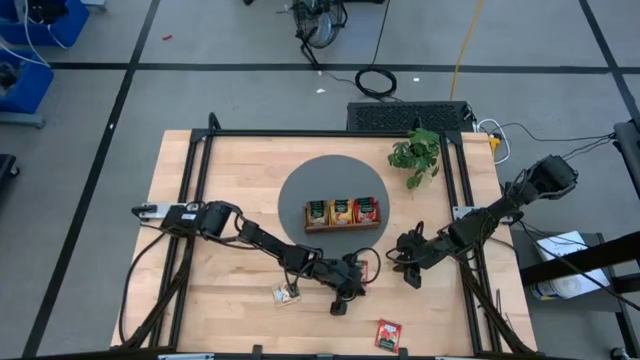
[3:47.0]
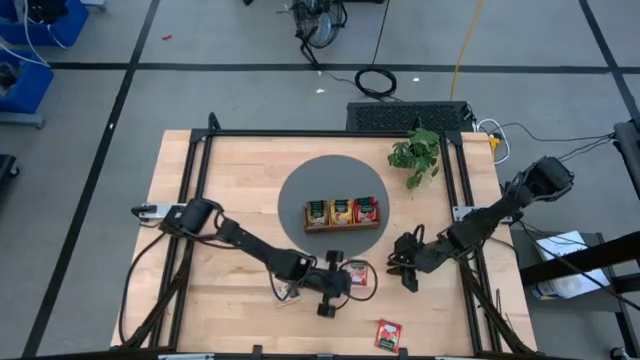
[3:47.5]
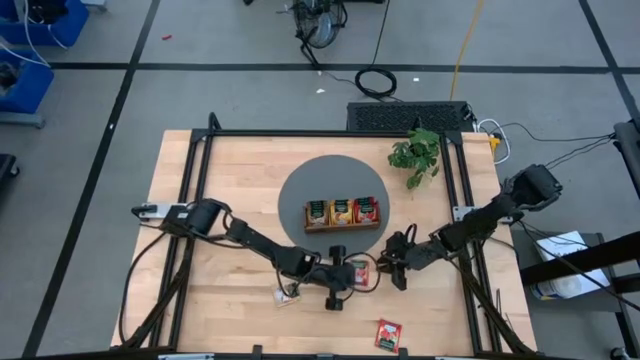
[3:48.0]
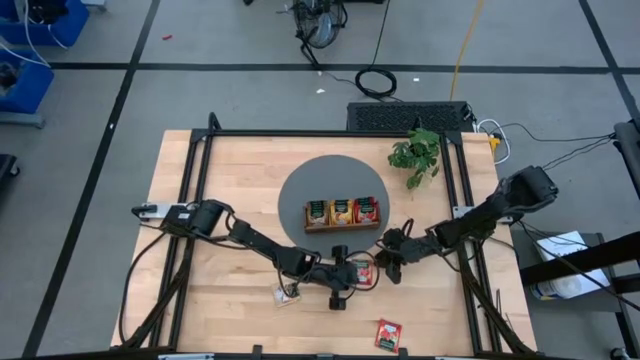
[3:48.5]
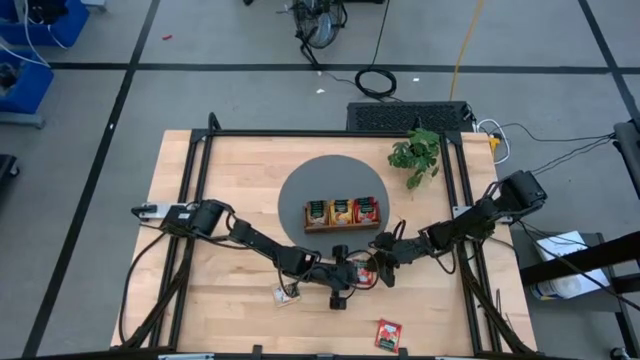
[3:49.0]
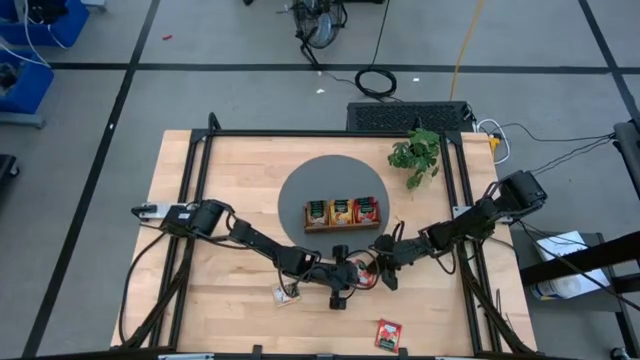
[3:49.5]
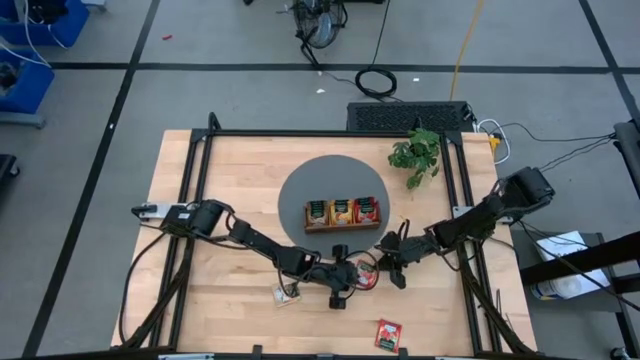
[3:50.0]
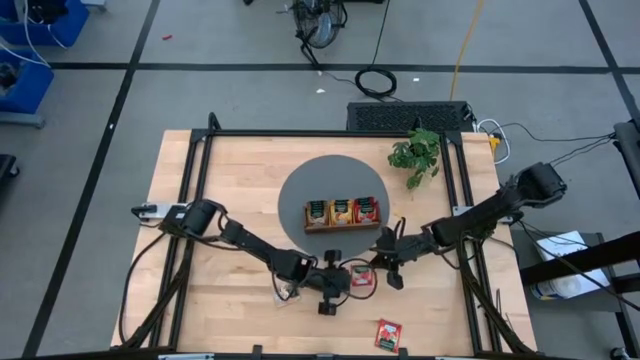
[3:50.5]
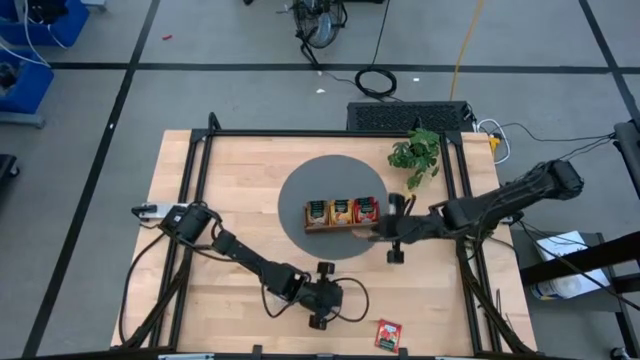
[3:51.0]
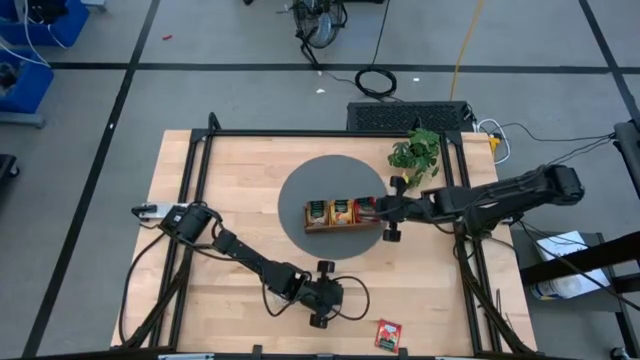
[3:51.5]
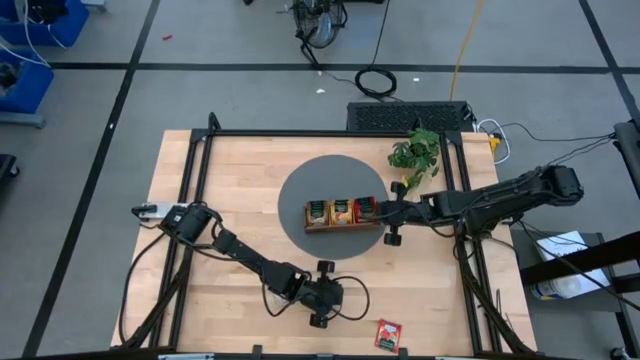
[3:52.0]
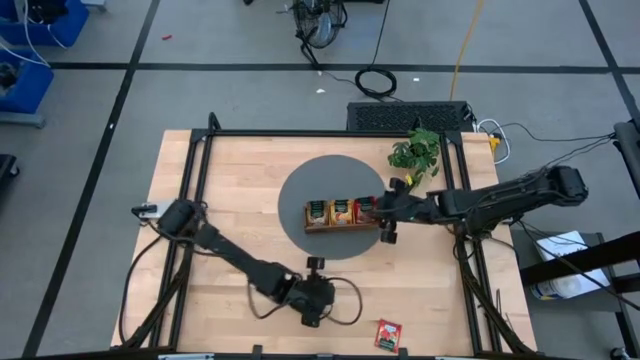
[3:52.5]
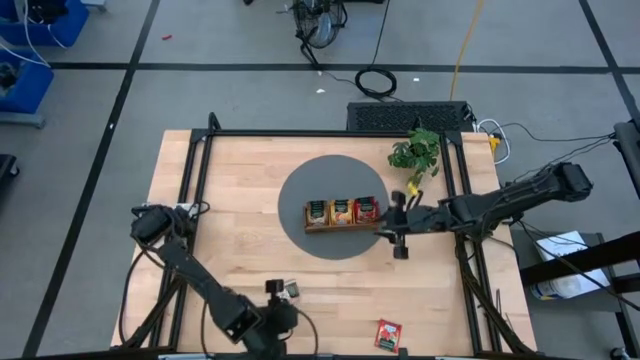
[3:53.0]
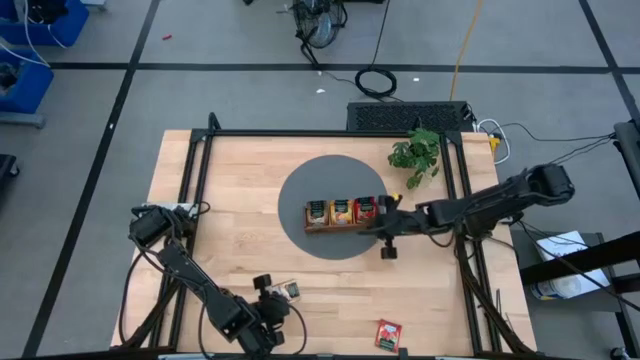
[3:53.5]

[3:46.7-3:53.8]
Task: Pick & Place Tea
Put the top red tea bag into the right slot of the wooden organizer

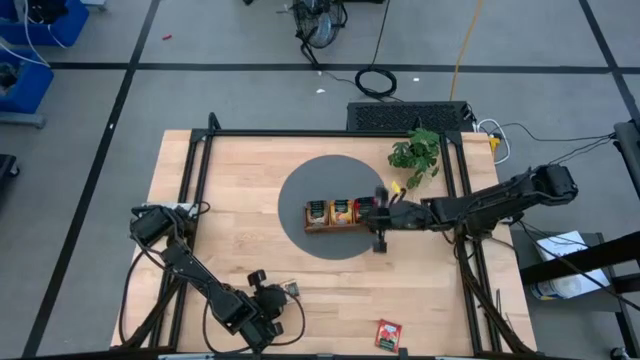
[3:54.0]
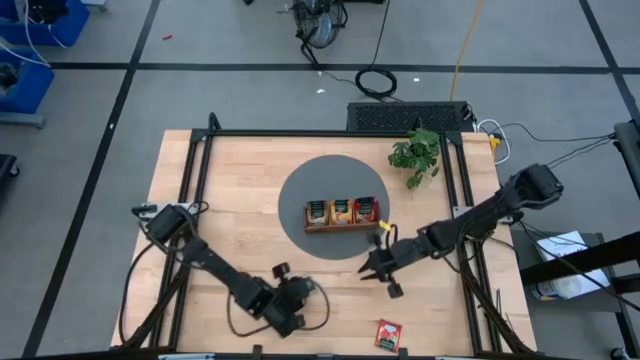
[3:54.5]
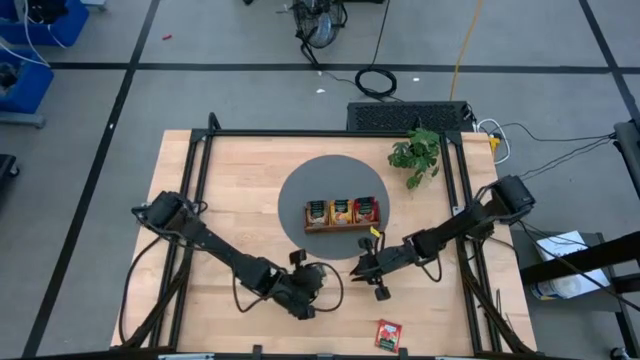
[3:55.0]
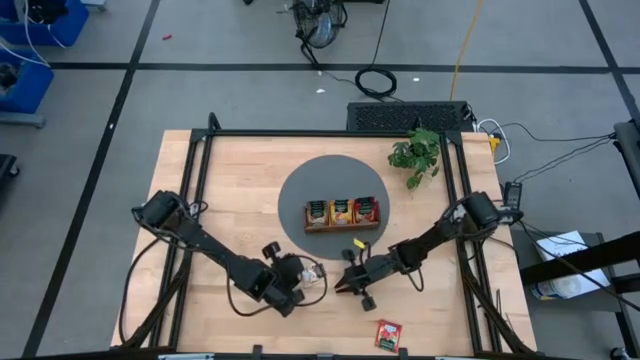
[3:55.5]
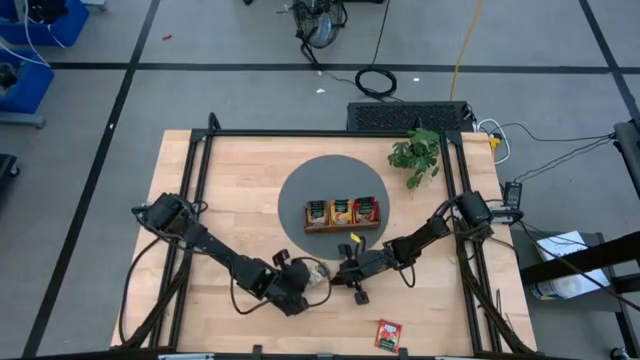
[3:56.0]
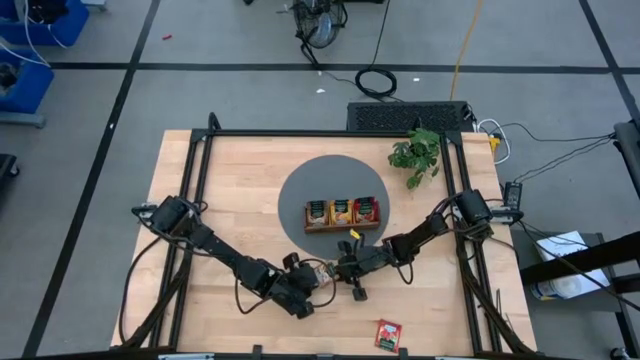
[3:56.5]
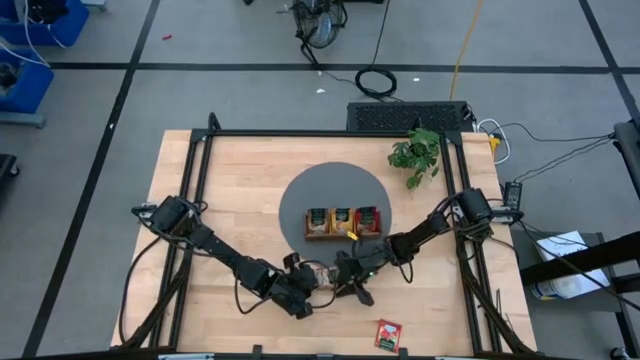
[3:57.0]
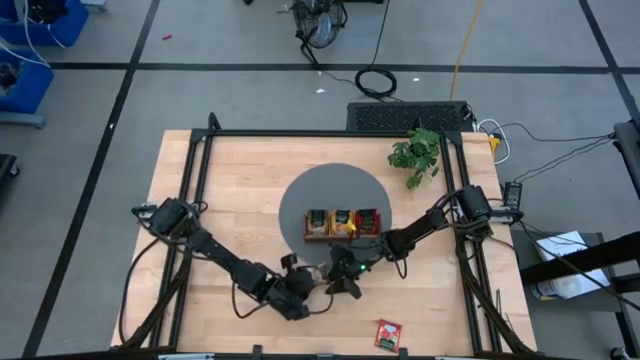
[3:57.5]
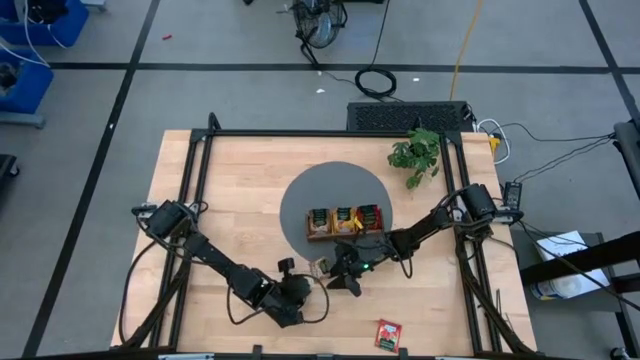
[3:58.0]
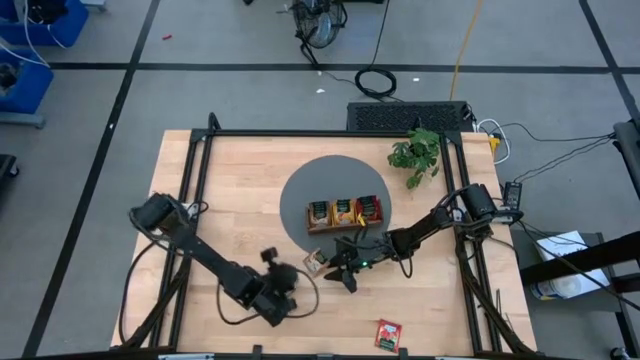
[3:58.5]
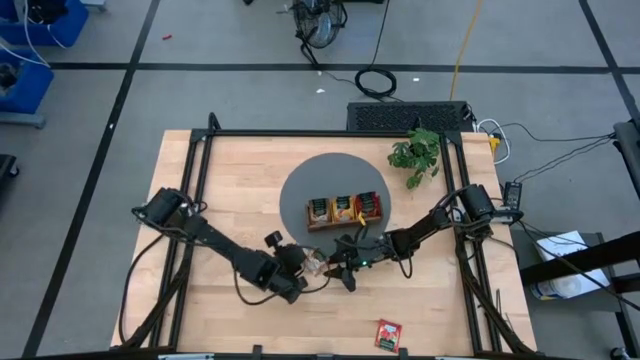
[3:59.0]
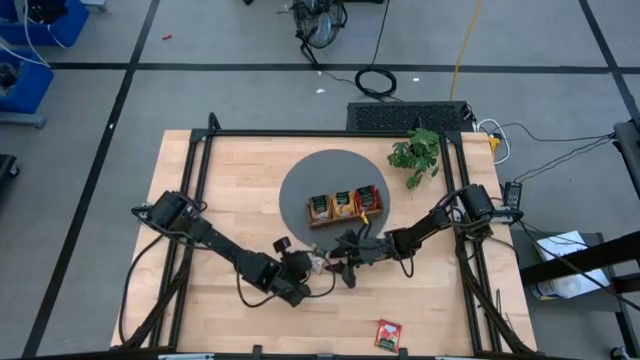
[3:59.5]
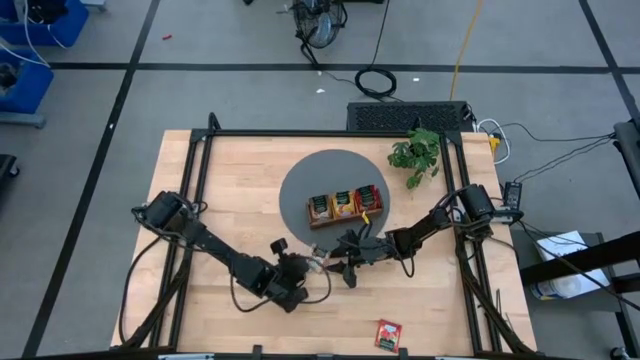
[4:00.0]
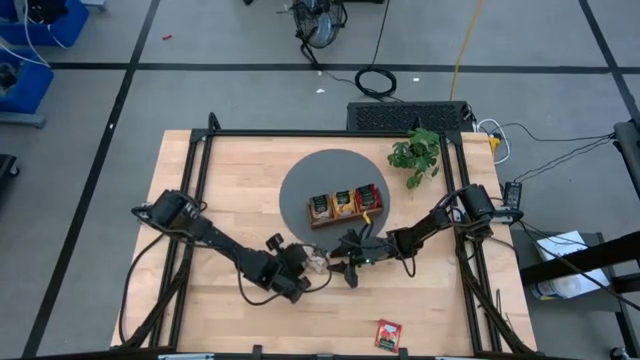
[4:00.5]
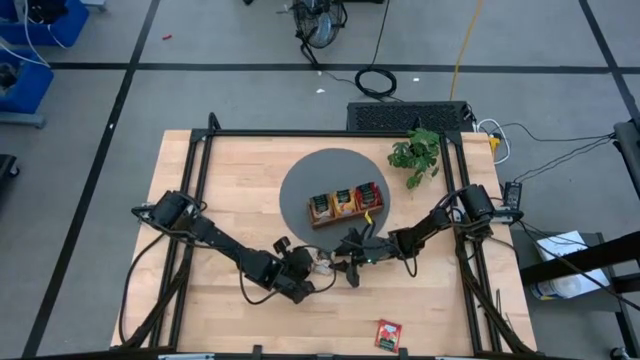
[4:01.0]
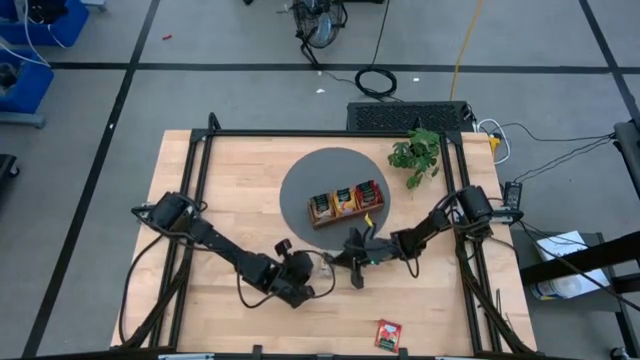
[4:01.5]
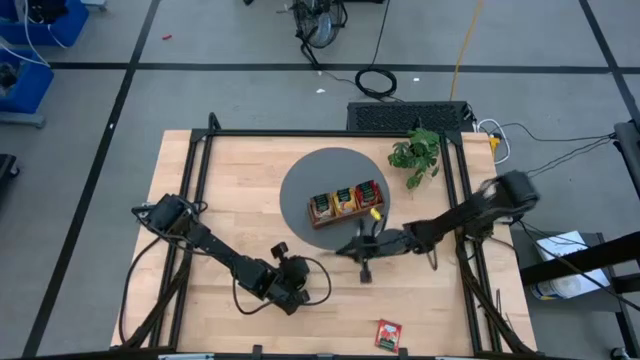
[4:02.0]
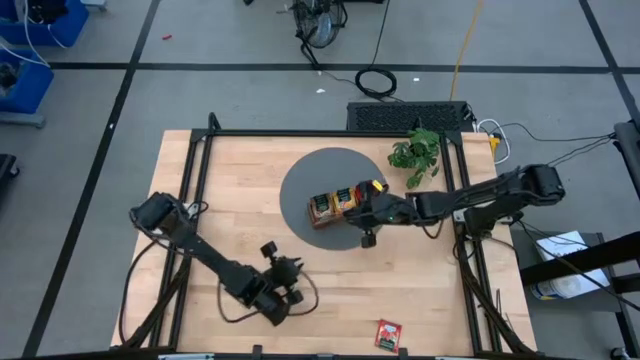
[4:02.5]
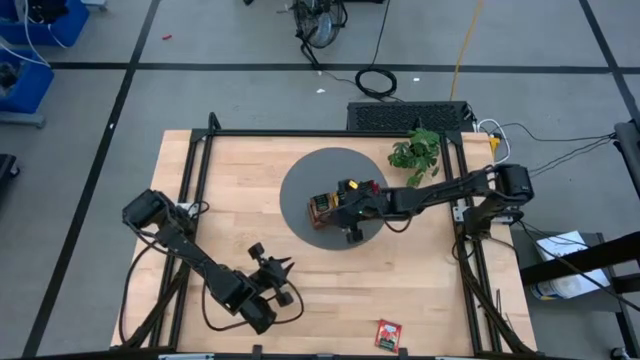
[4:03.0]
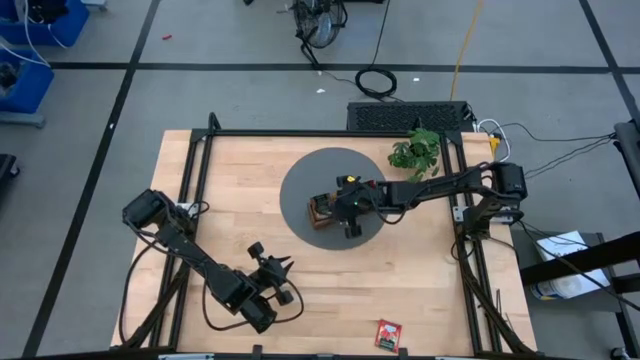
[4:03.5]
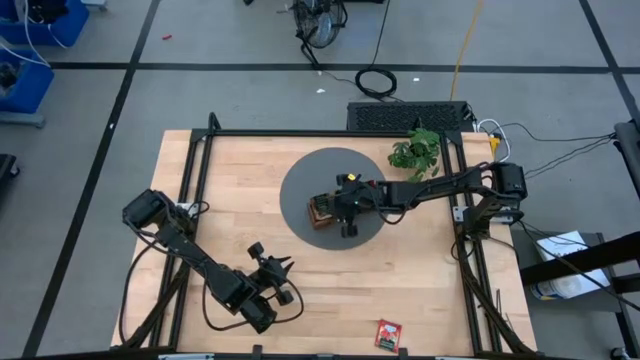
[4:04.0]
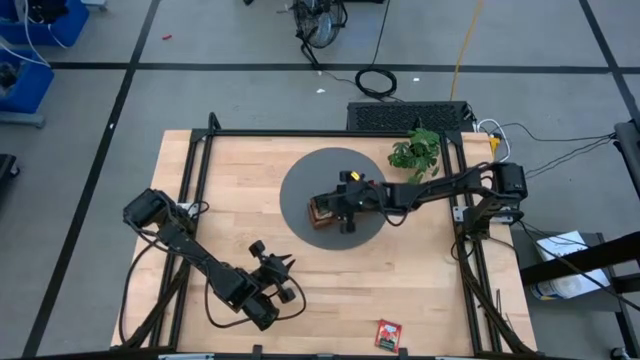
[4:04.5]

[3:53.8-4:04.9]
Put the brown tea bag into the left slot of the wooden organizer

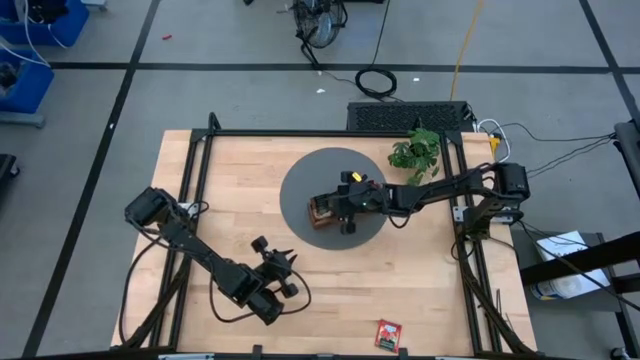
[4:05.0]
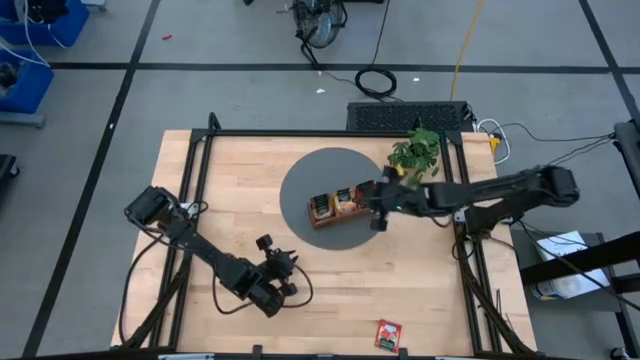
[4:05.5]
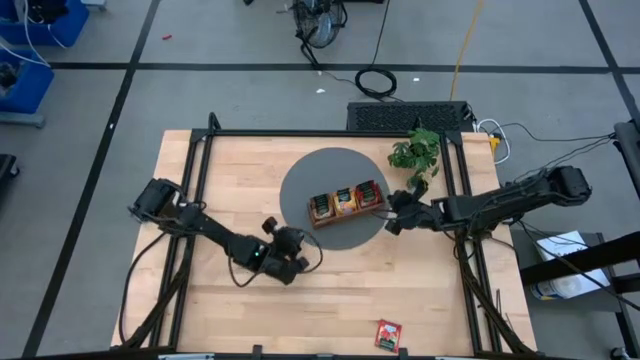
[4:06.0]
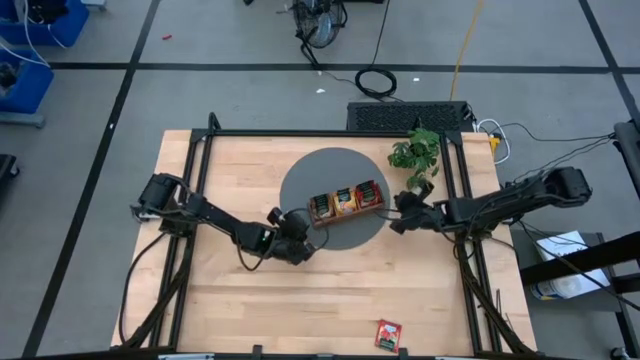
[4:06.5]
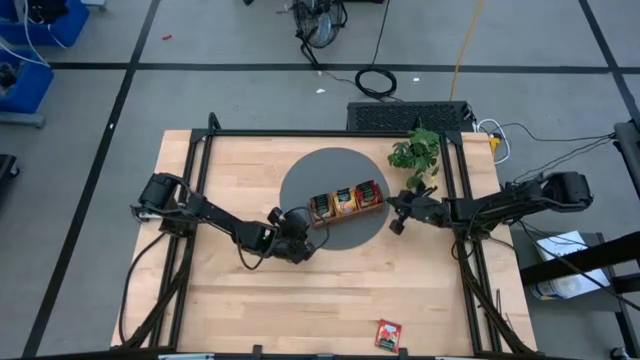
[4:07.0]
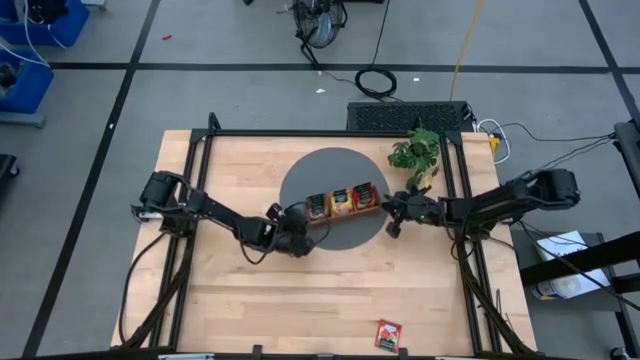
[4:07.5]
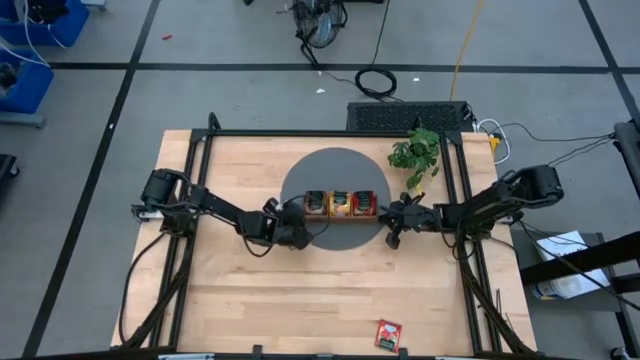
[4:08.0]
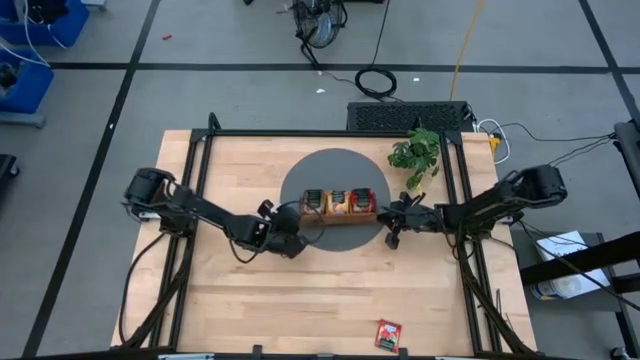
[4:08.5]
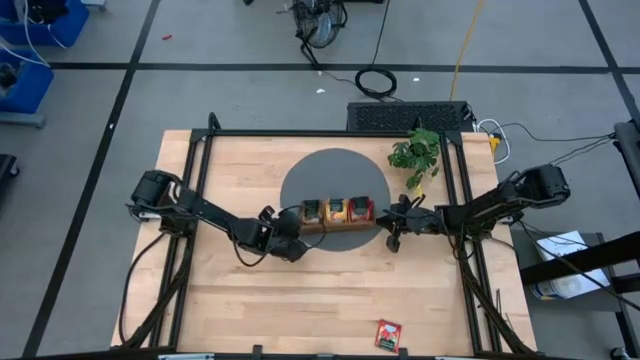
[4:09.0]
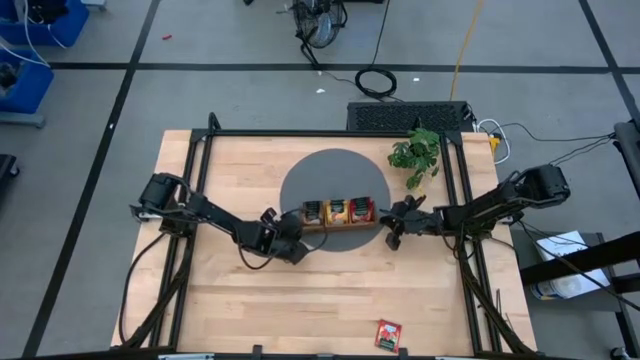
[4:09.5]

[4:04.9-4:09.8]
Adjust the wooden organizer on the mat
